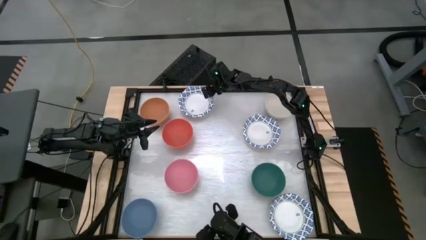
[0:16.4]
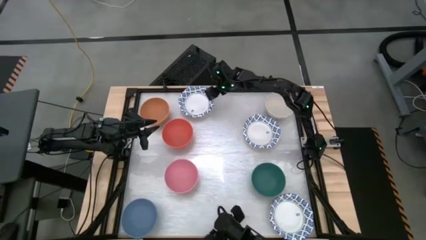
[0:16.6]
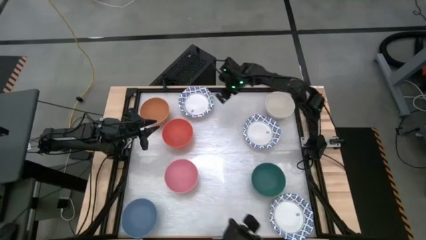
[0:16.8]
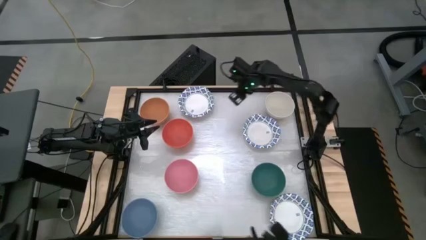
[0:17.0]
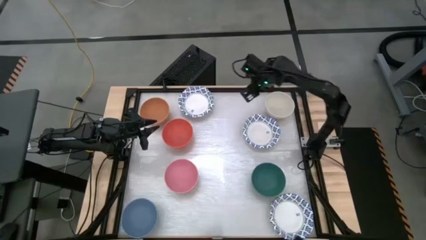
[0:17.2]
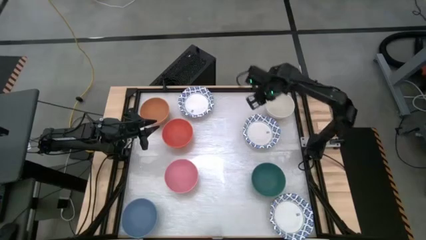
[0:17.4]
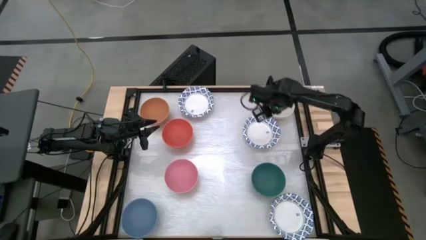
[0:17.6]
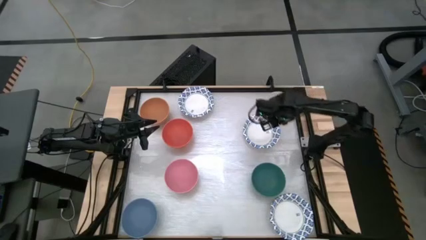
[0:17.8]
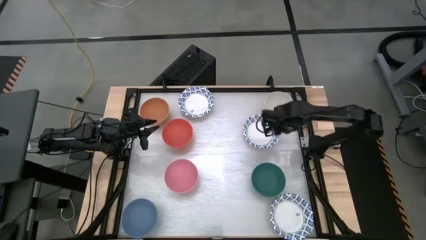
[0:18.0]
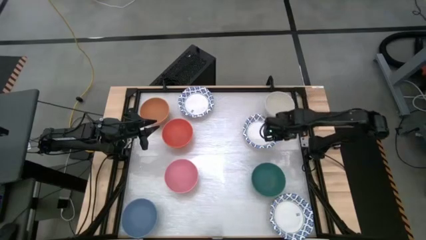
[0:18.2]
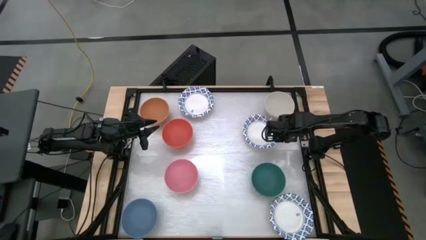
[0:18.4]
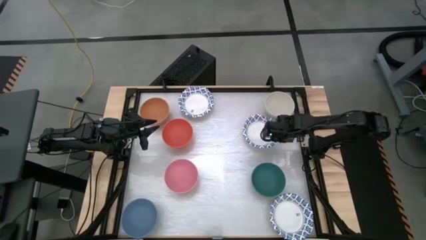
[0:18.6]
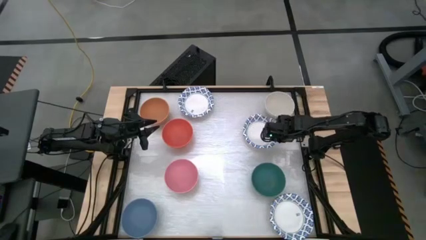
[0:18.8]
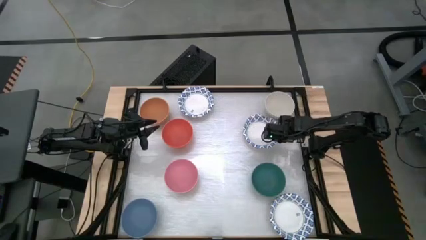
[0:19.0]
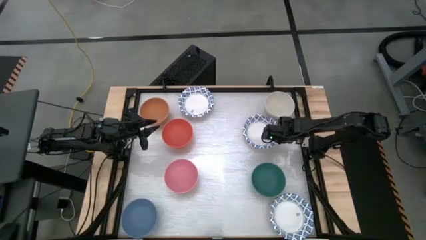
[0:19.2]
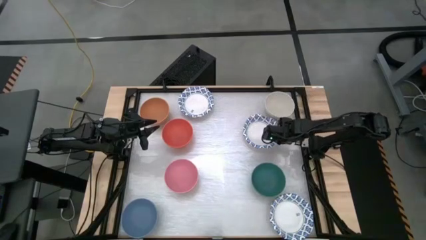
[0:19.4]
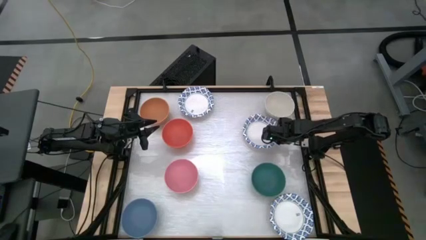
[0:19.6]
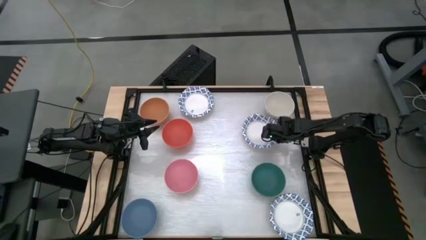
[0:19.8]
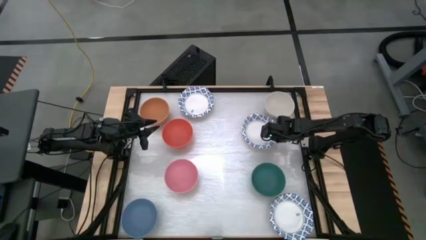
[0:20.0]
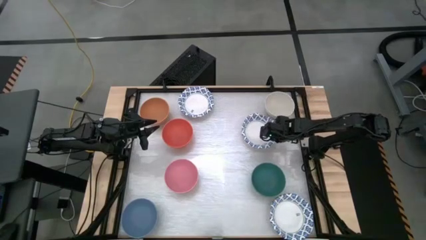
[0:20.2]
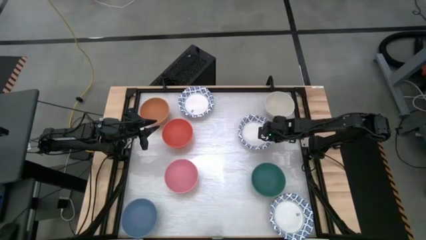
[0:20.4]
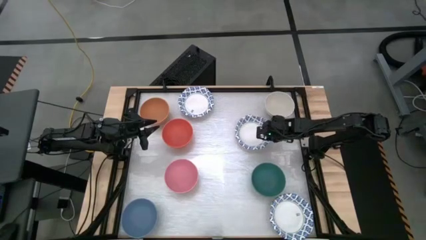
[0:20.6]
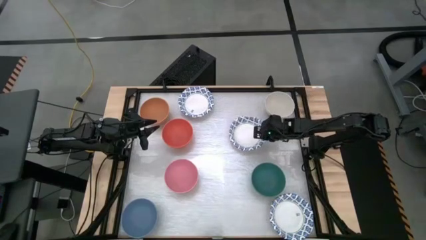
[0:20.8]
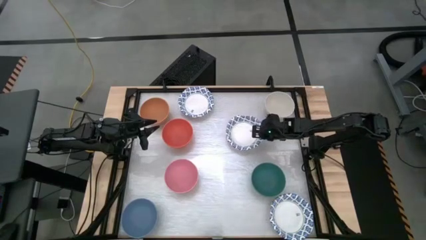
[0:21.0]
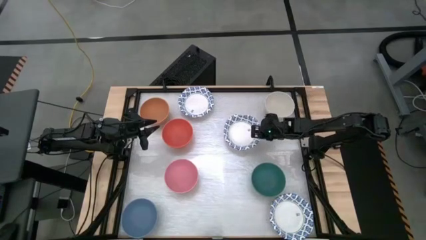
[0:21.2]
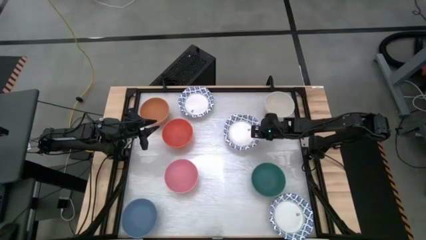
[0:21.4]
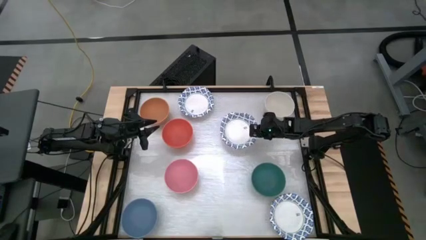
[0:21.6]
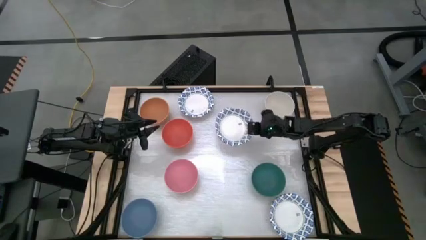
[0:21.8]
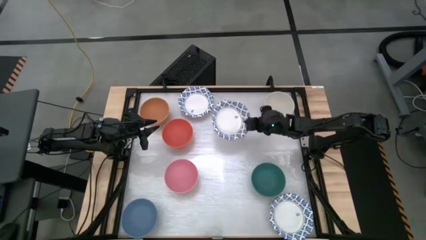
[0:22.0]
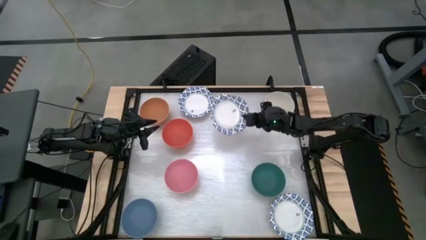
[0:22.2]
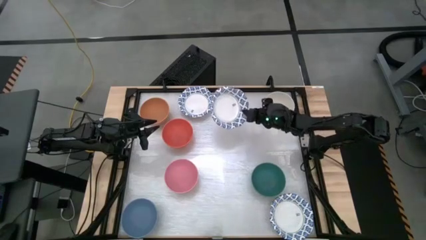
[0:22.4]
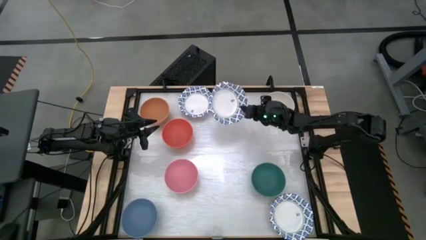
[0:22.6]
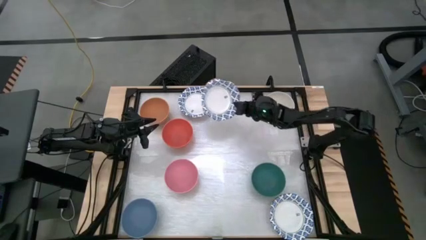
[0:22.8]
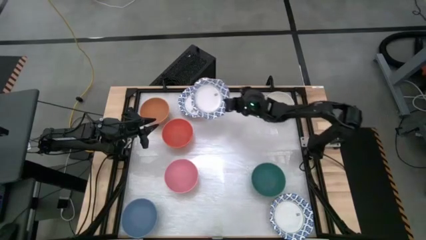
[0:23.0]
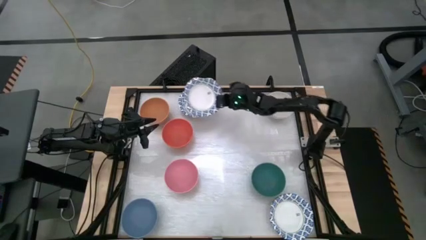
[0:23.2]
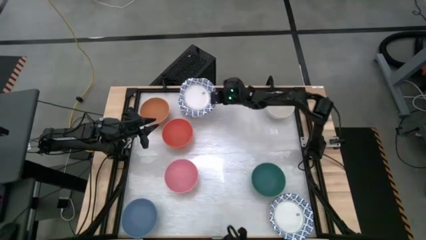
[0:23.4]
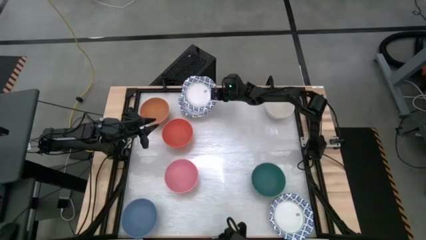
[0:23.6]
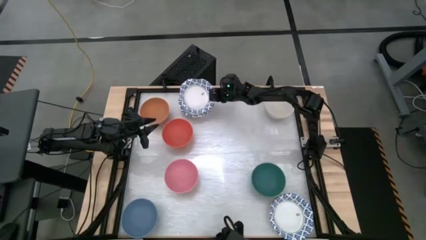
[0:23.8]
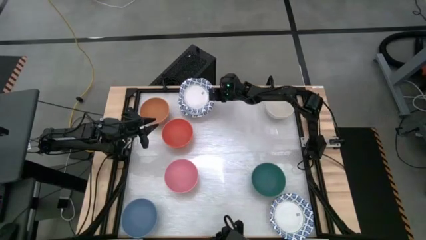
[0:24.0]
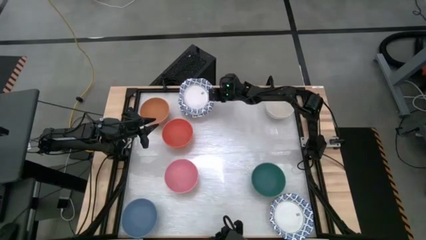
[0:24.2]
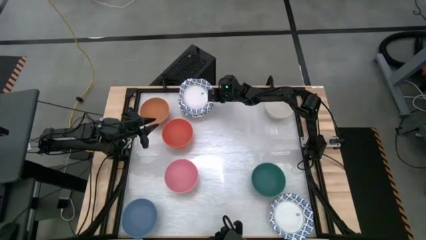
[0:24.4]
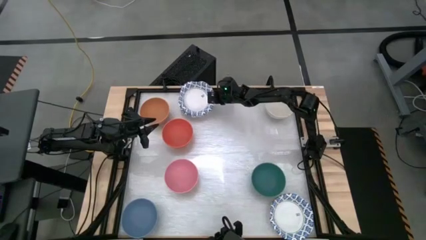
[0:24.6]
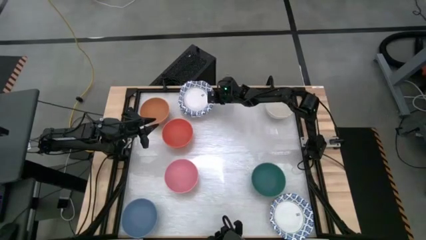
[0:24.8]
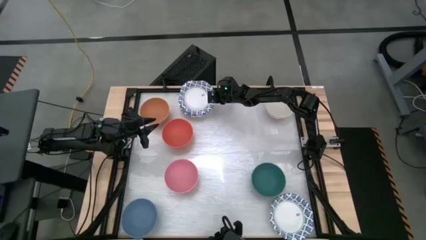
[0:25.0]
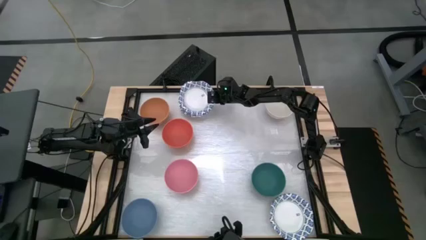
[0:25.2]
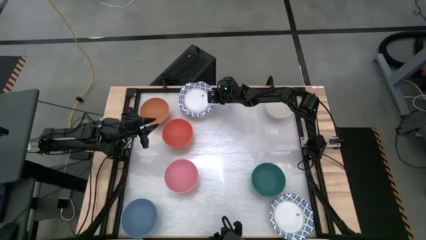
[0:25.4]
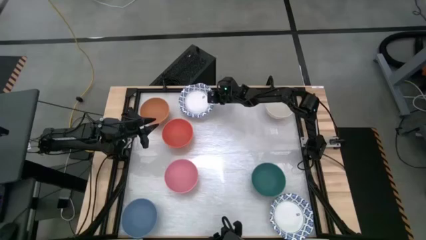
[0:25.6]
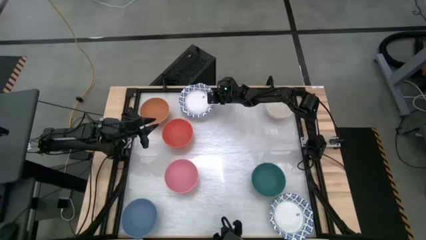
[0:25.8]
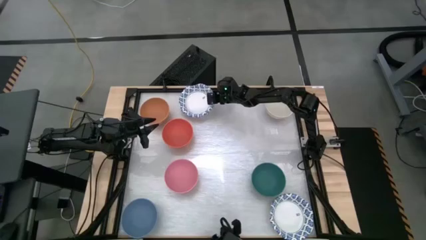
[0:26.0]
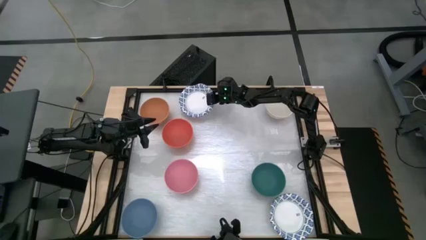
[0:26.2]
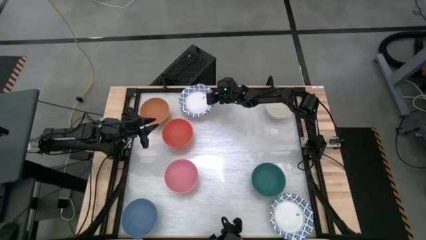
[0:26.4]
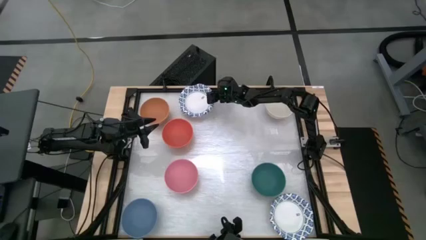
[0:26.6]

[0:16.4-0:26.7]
Stack the middle white patterned bowl onto the stack of bowls
